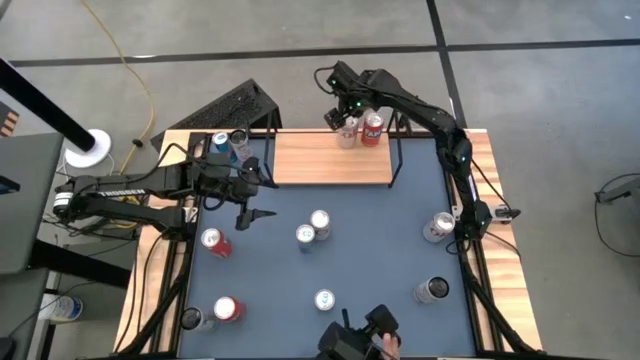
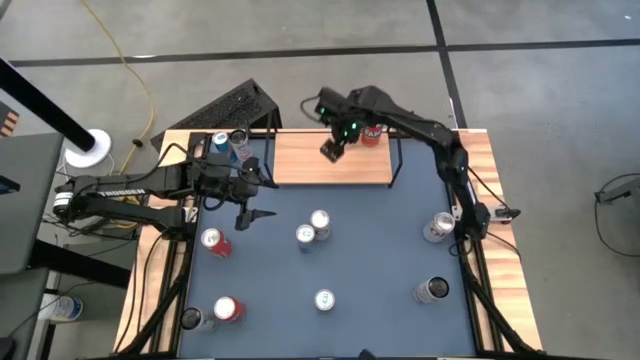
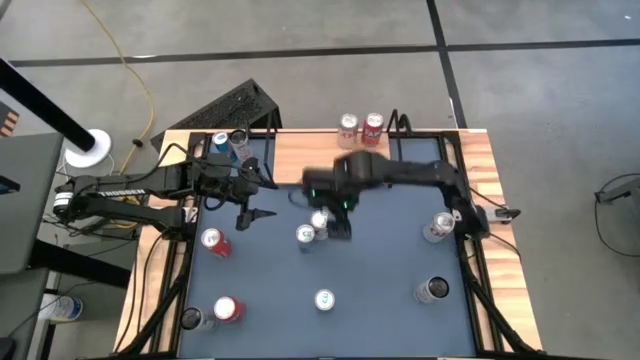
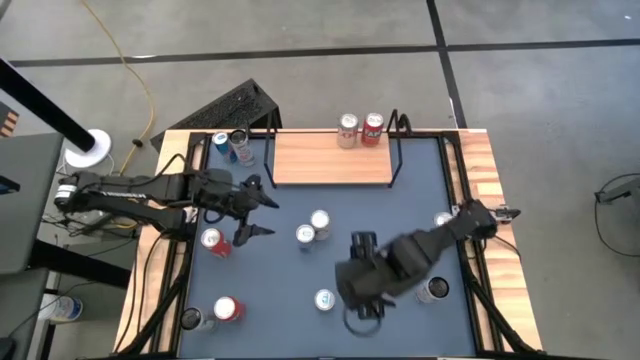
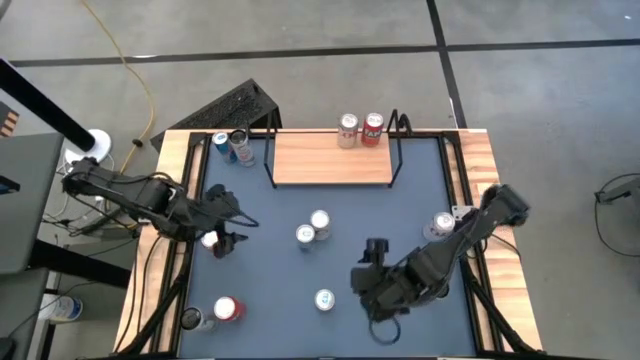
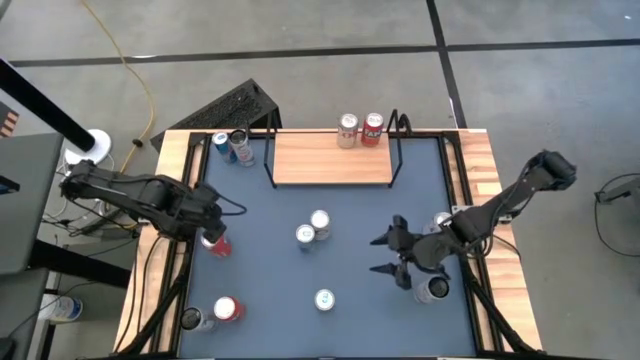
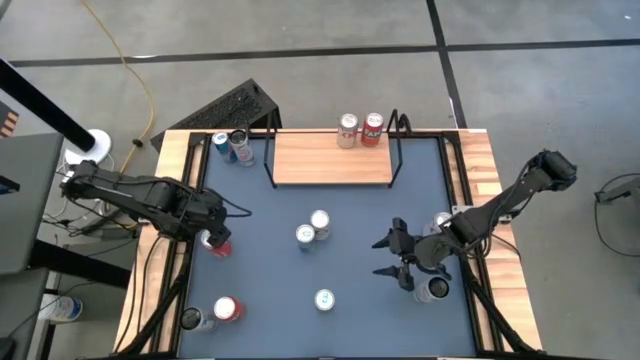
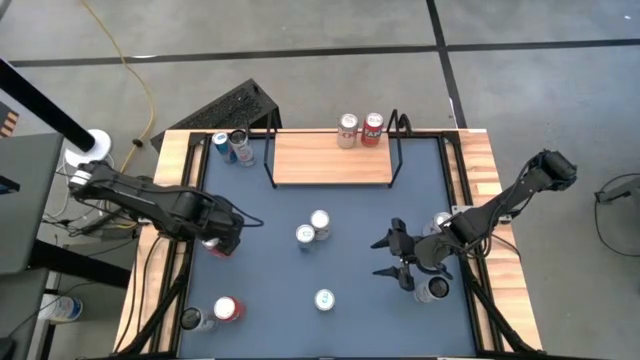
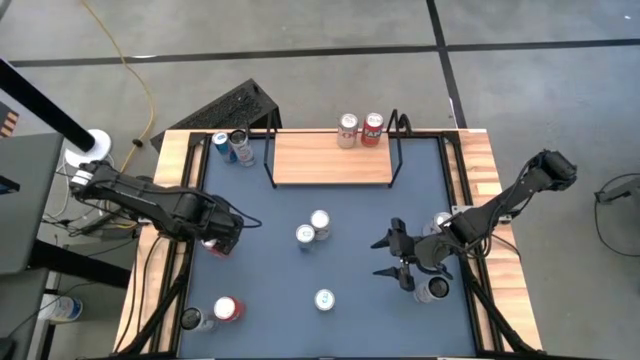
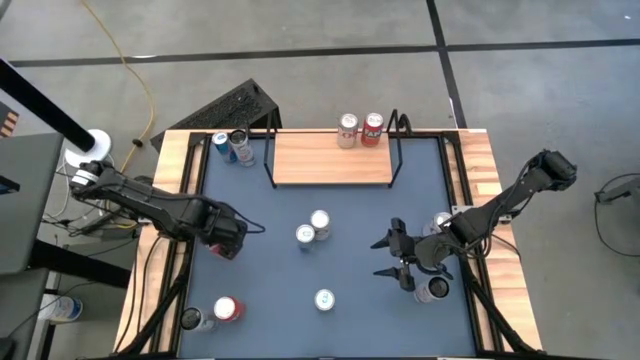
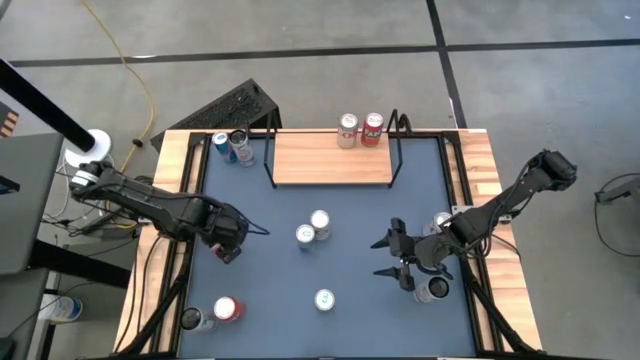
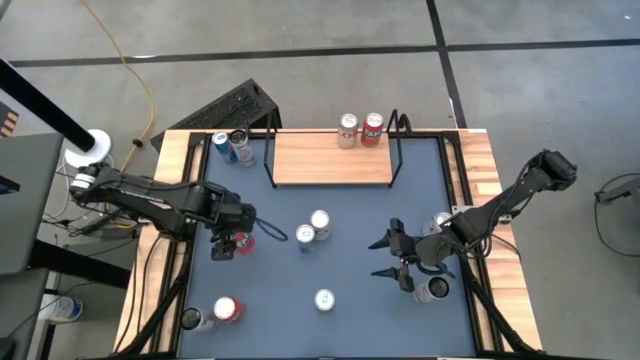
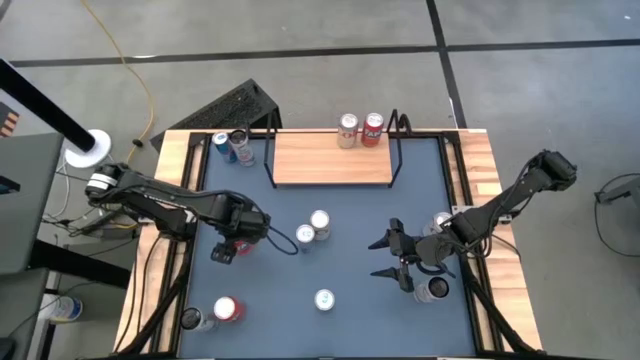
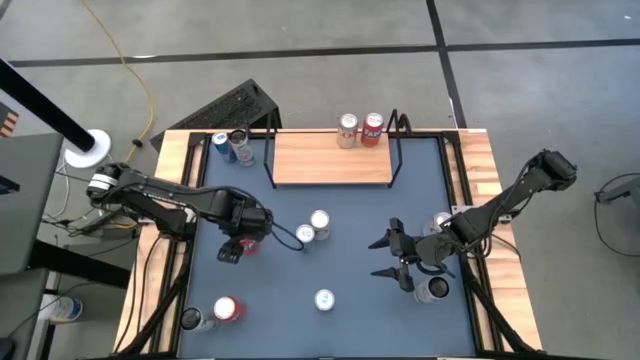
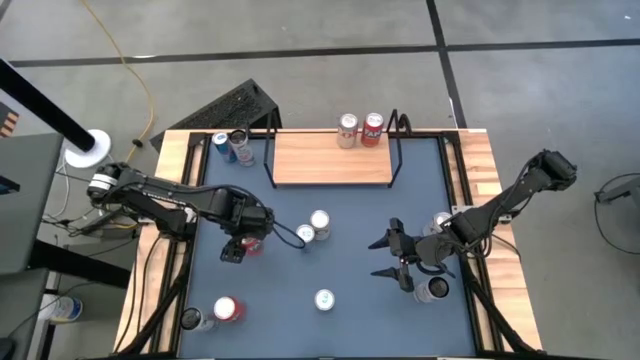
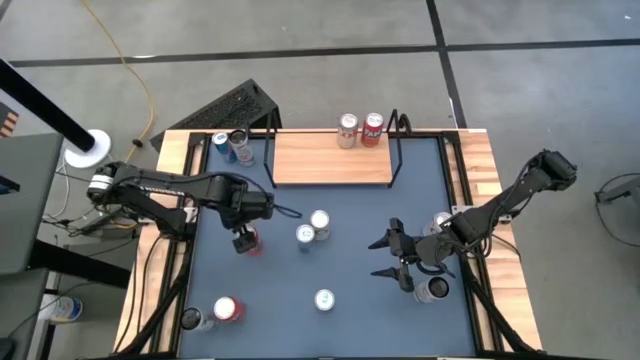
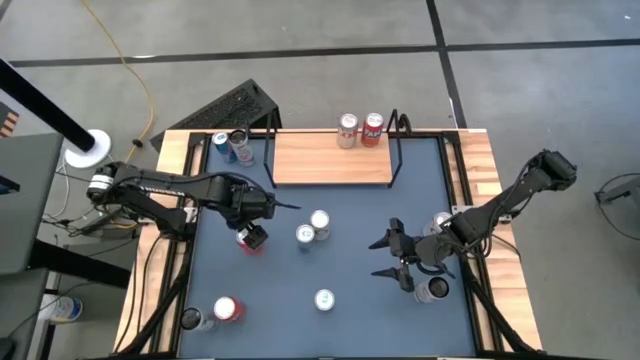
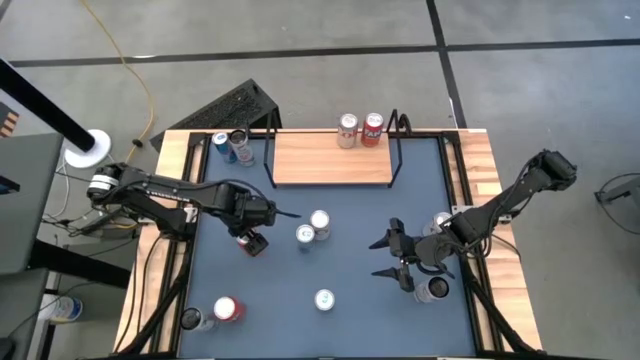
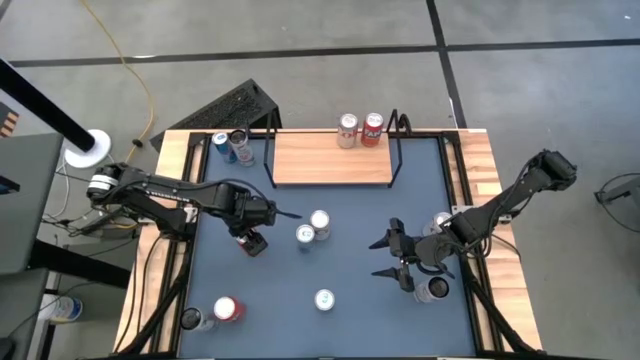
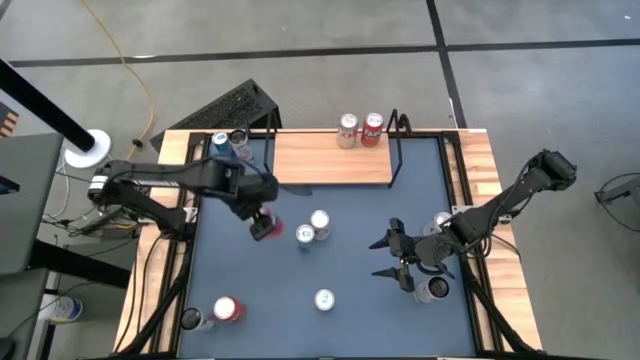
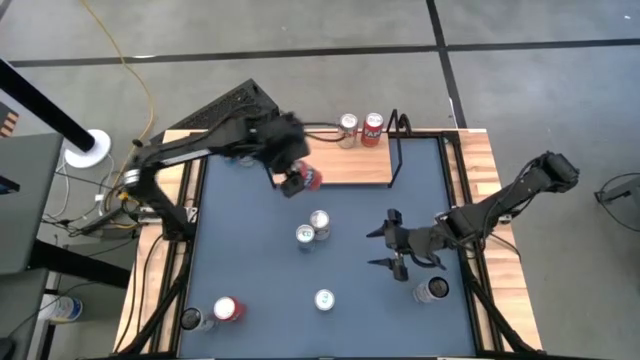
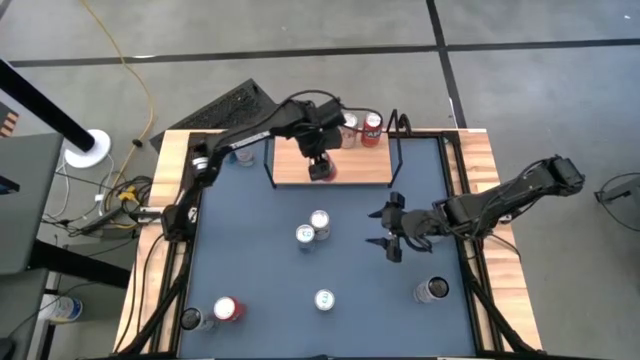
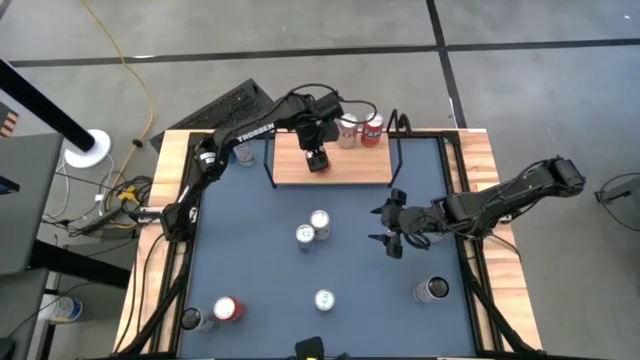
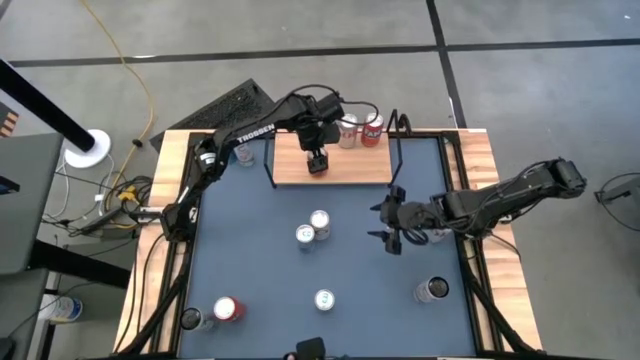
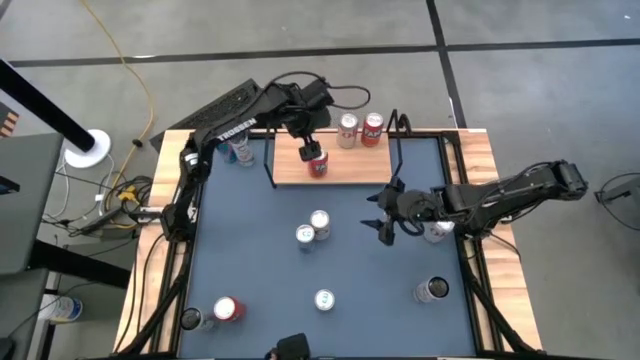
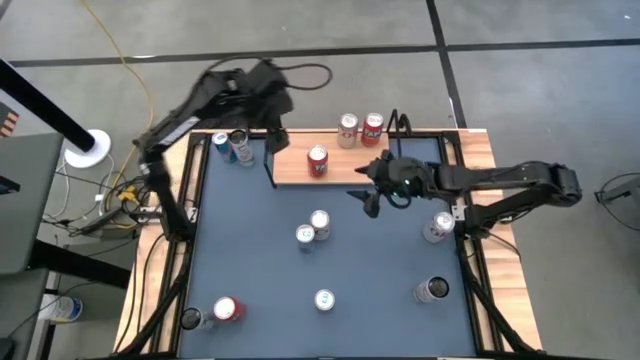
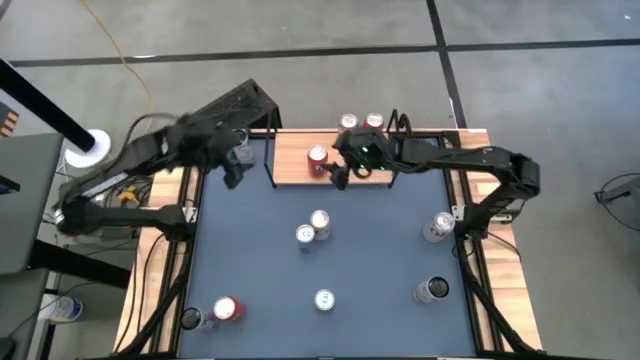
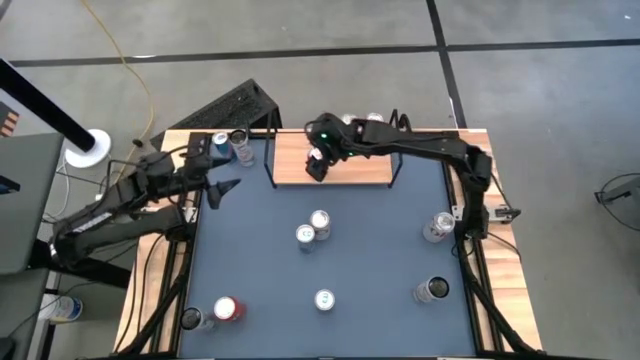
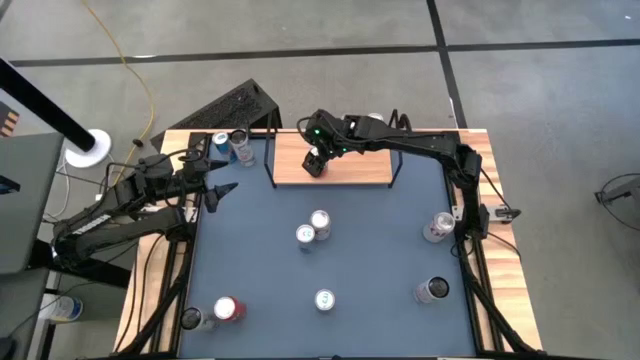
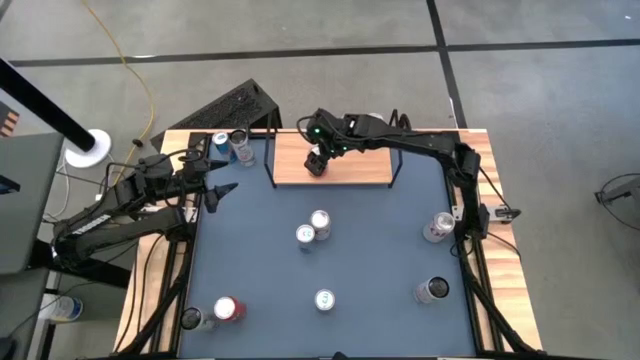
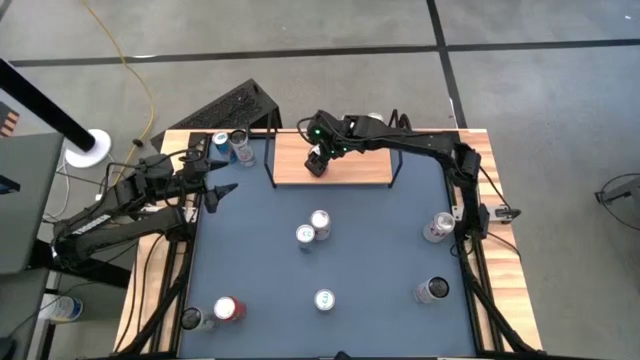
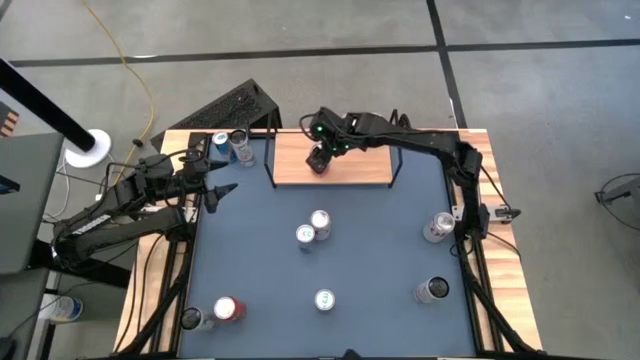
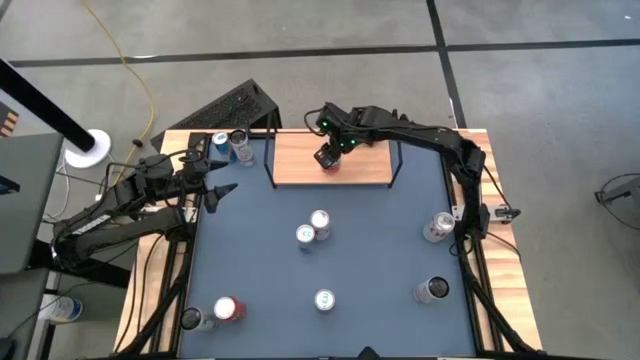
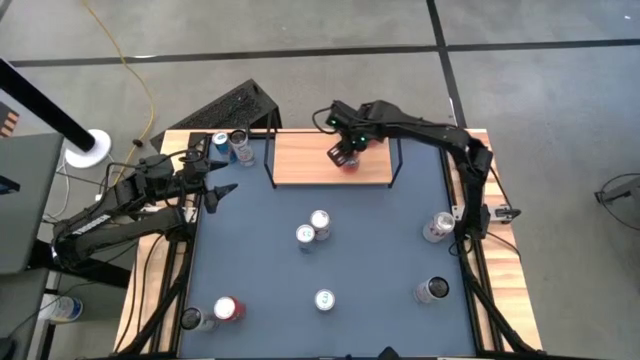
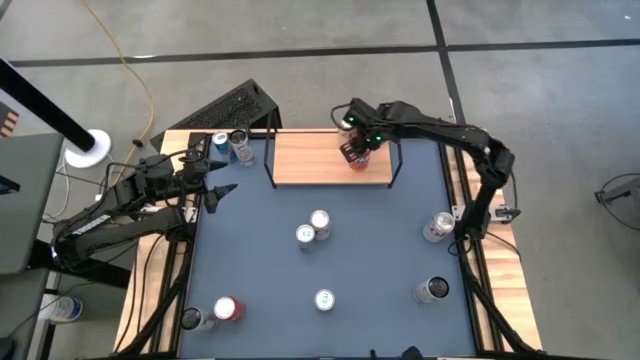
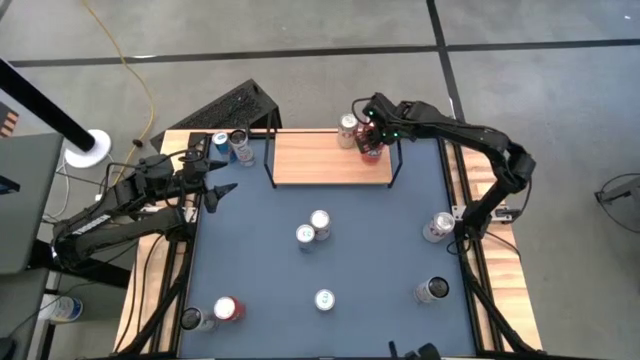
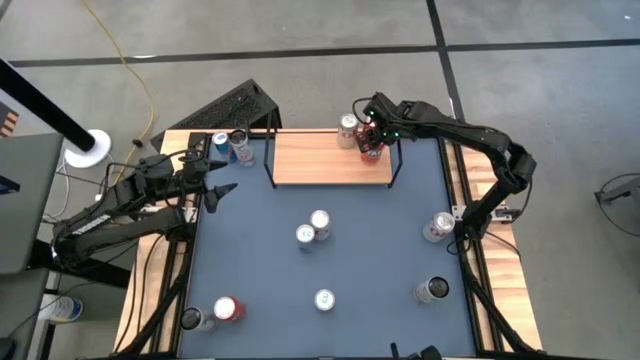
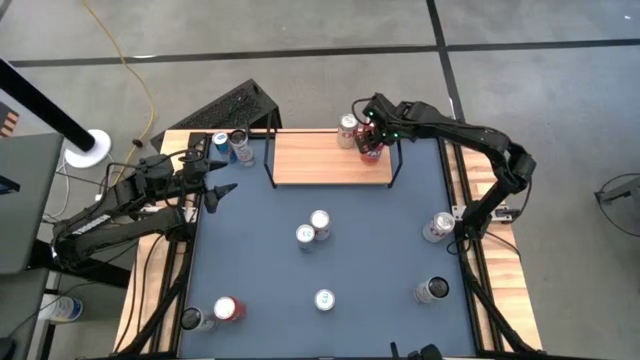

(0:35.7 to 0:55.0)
Task: Place canned beverage on shelf
Put the top red soda can on the shelf aligned with the other red soda can

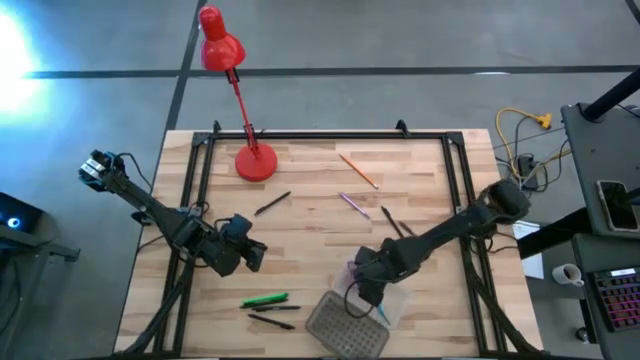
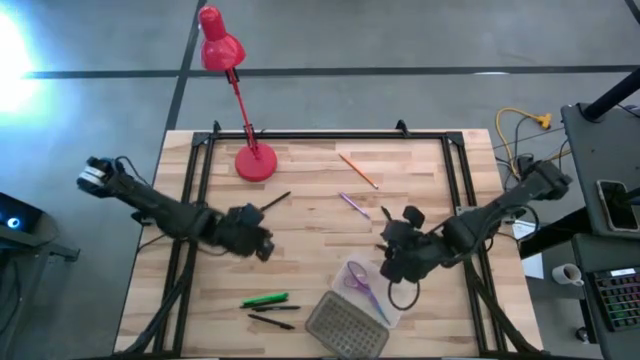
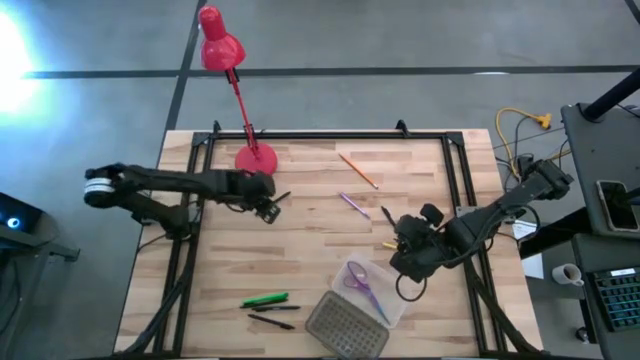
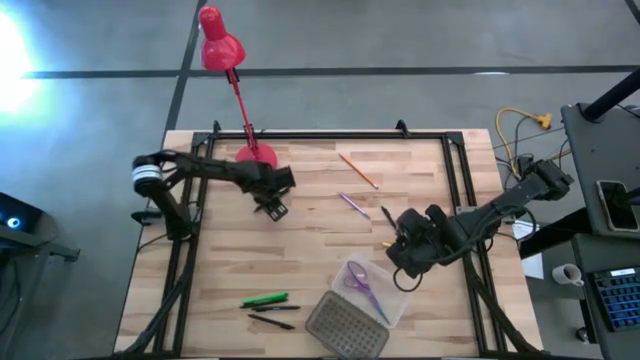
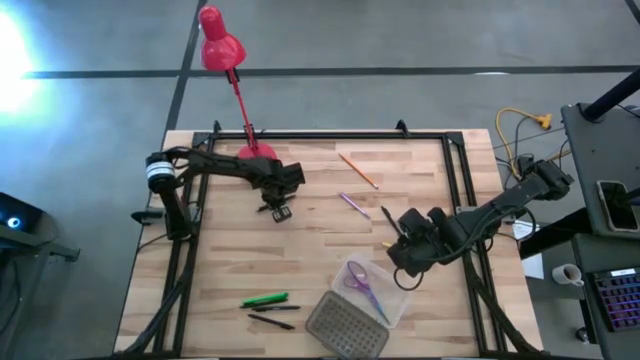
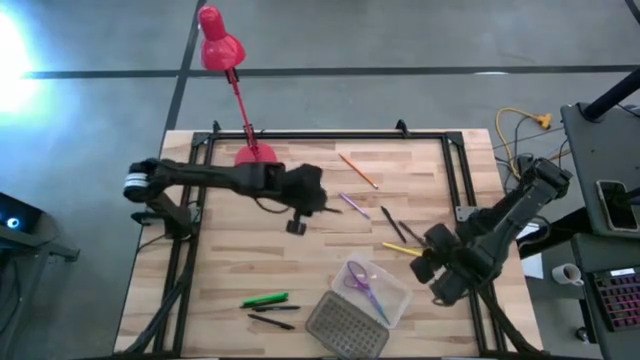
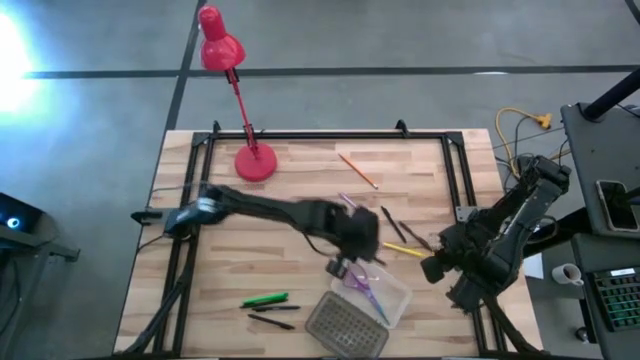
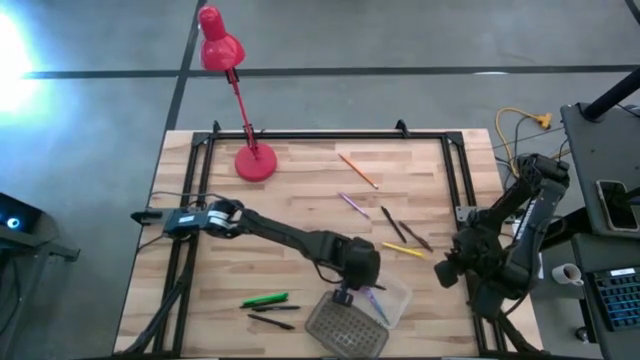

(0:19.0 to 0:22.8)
Task: Pick & place school supplies into a supply box
Put the black pen into the supply box
